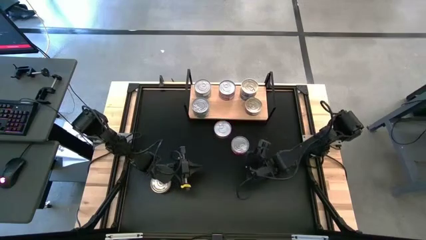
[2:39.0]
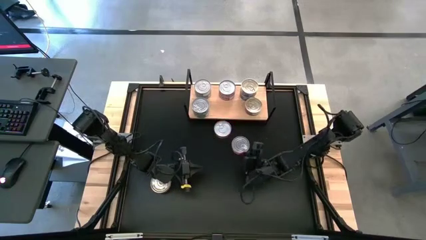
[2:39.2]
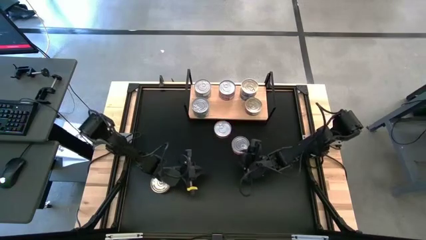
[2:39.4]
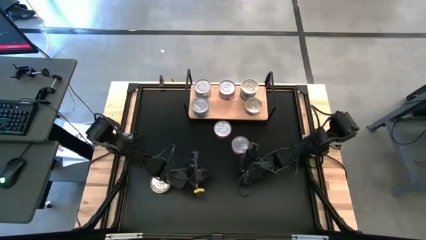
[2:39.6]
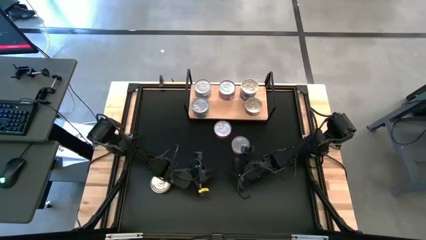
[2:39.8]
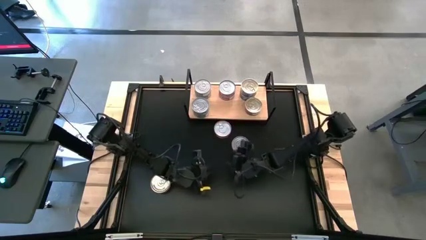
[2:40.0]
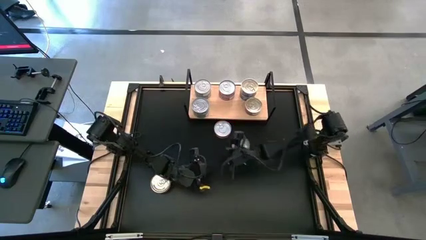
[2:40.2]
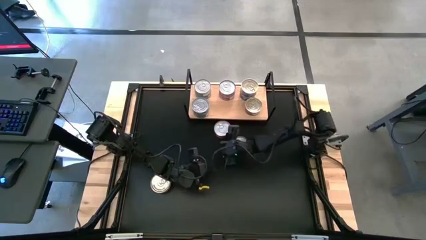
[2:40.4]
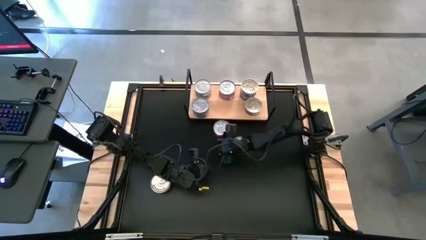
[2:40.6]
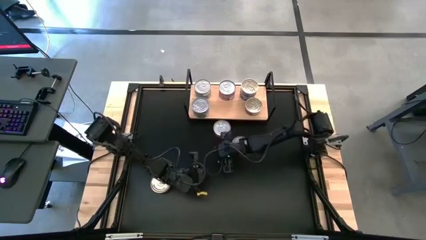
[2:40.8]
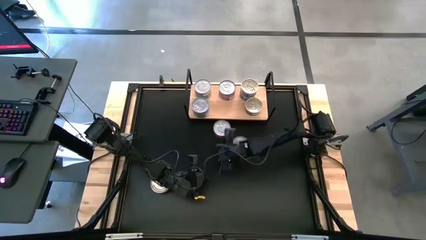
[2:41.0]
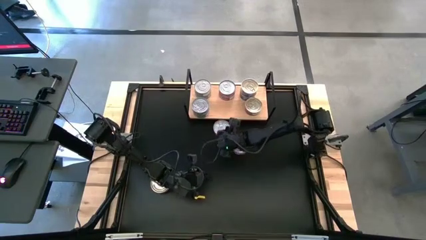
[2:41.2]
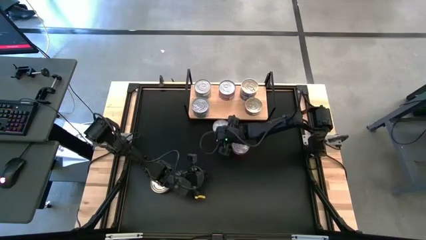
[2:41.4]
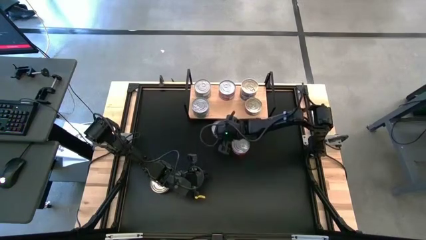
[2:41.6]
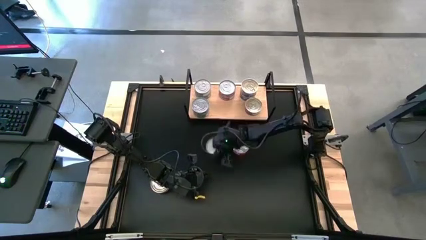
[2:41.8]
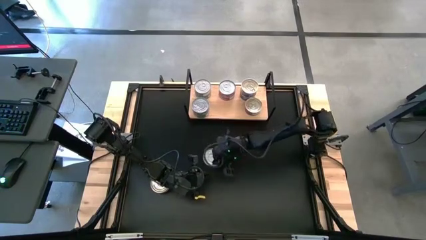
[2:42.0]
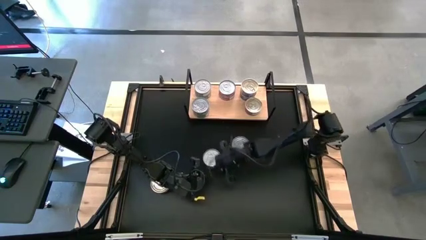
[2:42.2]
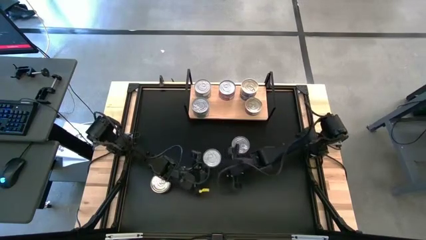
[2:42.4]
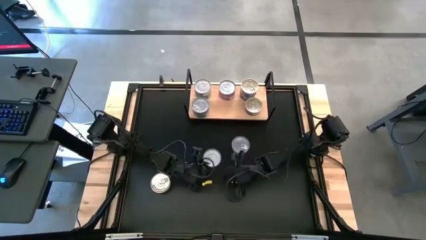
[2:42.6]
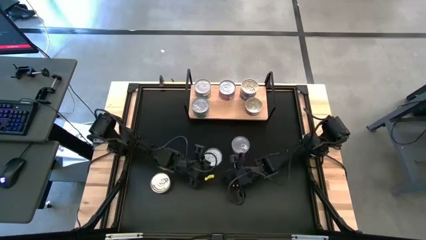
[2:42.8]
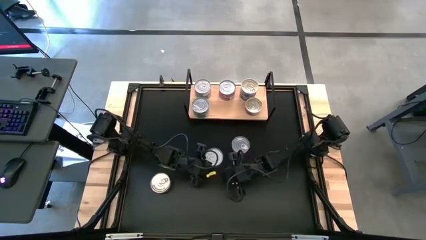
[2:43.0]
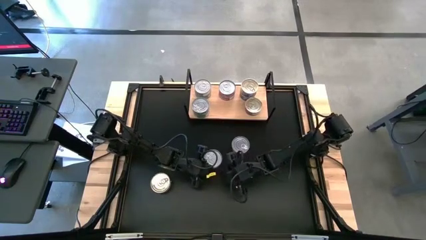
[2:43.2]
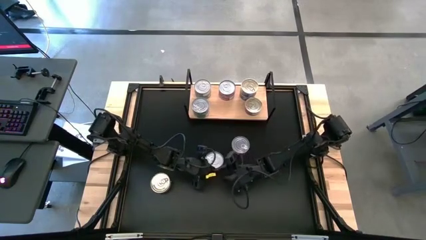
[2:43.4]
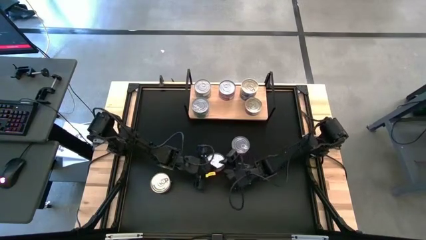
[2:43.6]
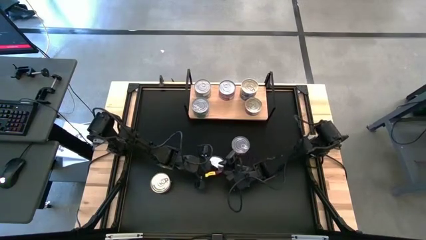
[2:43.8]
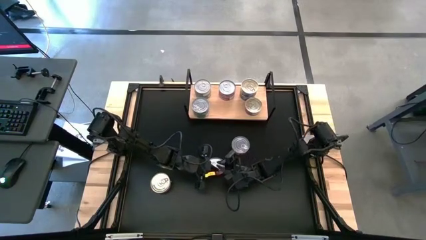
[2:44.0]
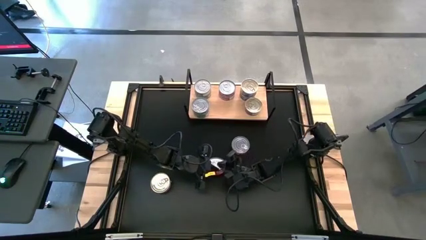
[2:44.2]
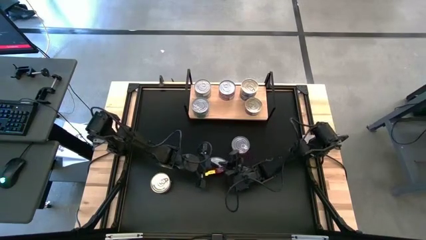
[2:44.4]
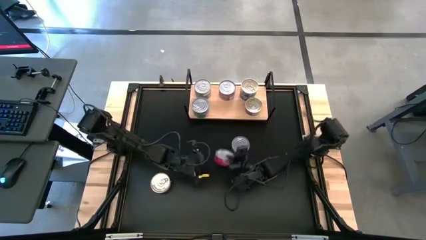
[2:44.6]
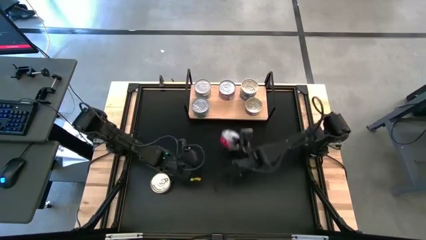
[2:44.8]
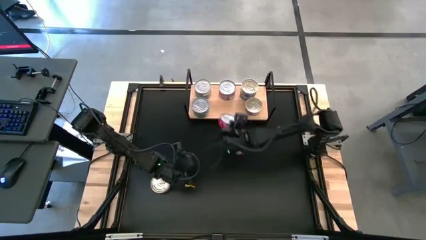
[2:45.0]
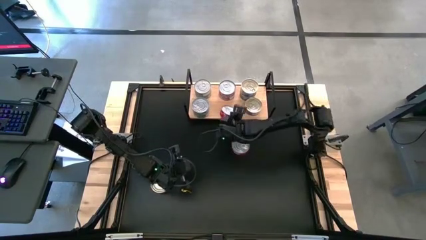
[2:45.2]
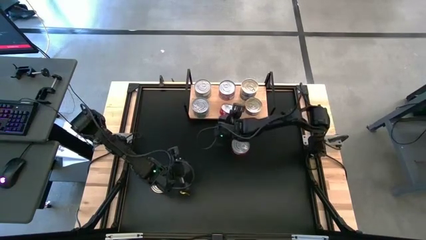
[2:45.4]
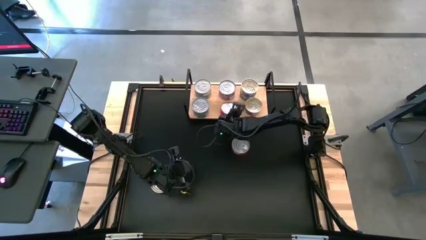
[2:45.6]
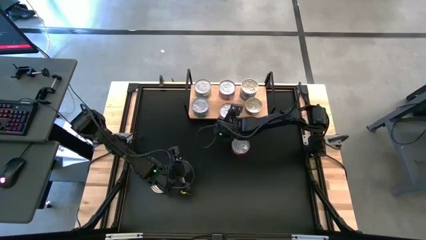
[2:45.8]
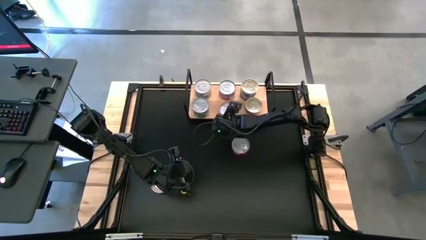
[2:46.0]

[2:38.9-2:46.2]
Task: Stack canned seafood by type on shelf
Put the red tuna can on the shelf

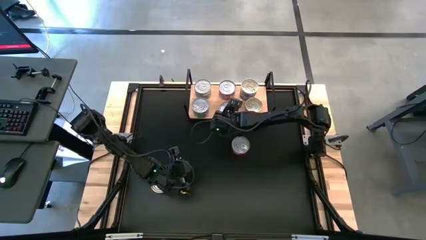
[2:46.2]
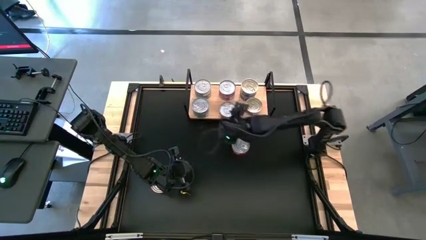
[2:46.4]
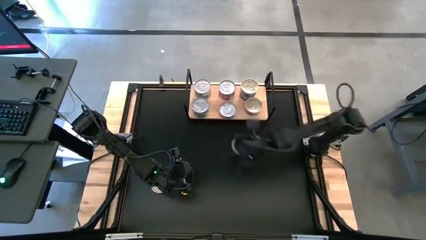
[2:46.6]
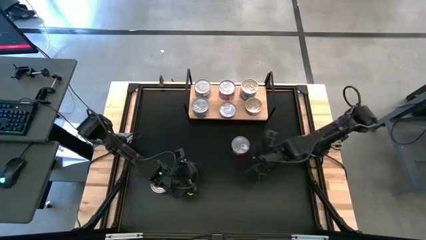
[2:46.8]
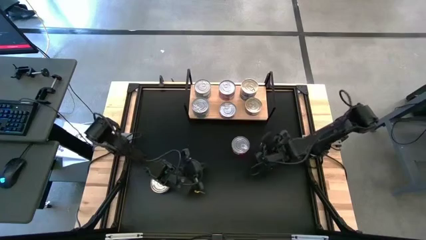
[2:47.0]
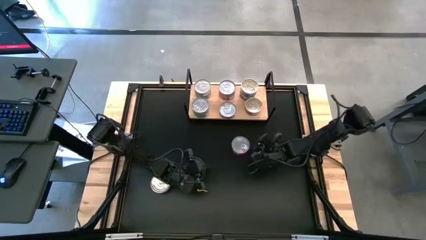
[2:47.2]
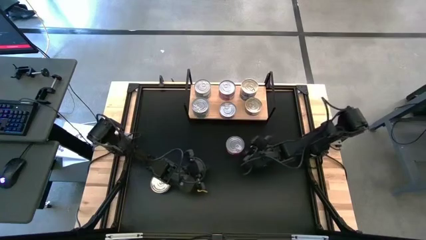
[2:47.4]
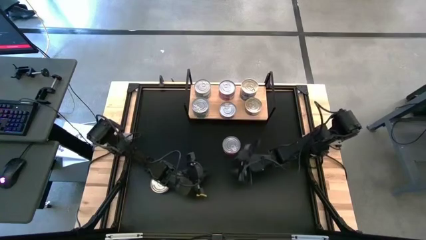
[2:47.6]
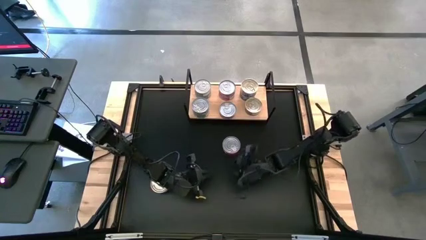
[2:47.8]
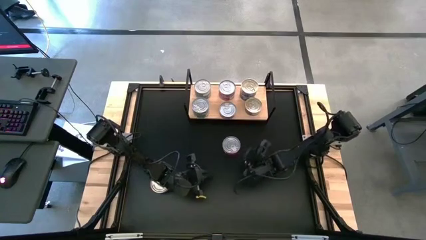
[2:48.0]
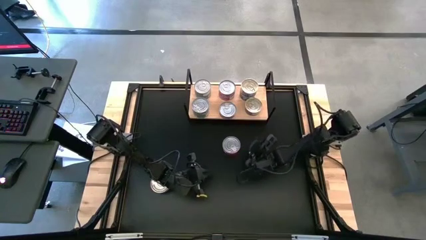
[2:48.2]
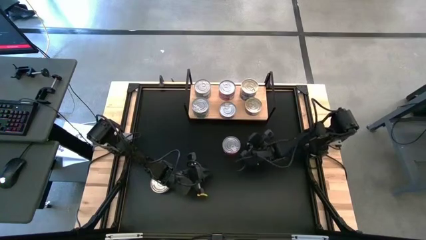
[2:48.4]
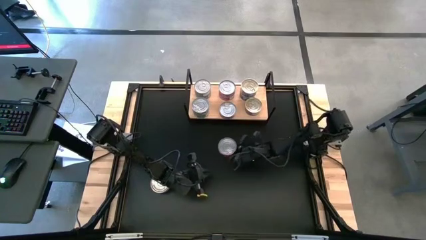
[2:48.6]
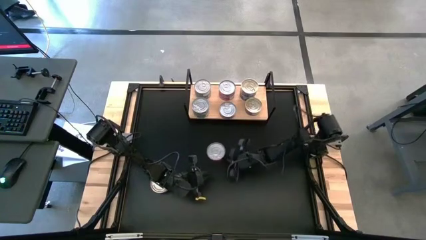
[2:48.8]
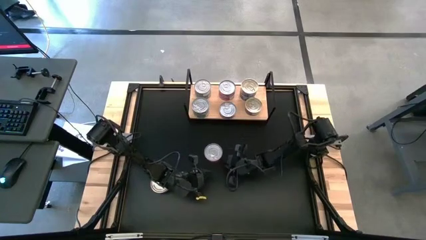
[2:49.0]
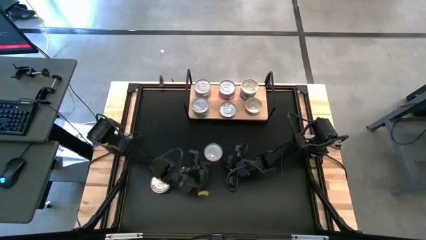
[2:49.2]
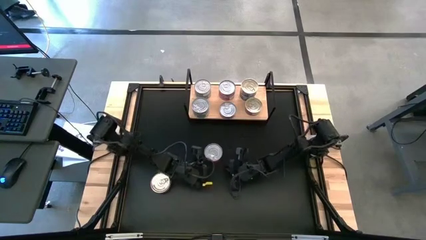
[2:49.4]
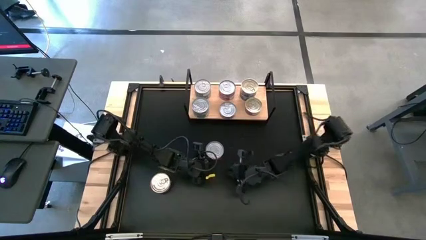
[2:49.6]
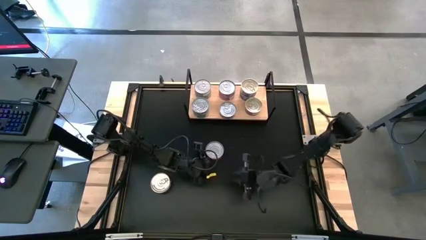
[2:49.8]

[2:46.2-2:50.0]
Stack the red tuna can on top of the red tuna can on the shelf

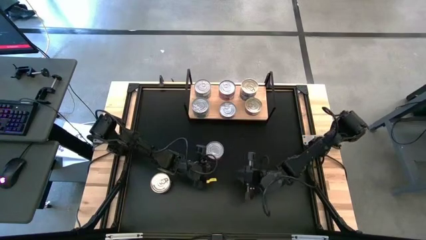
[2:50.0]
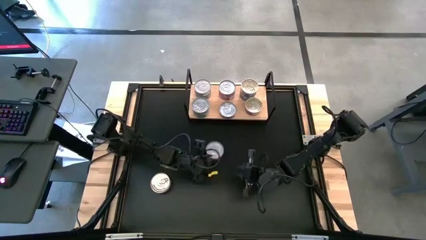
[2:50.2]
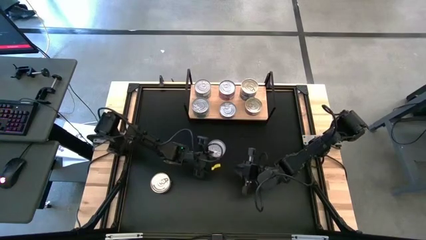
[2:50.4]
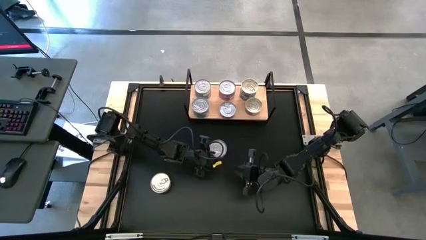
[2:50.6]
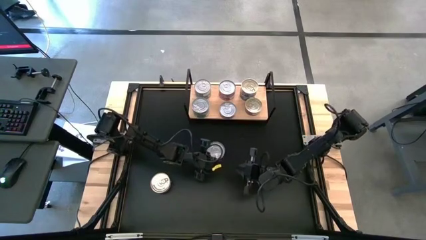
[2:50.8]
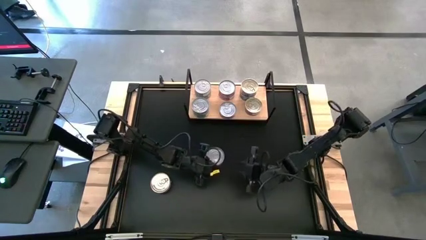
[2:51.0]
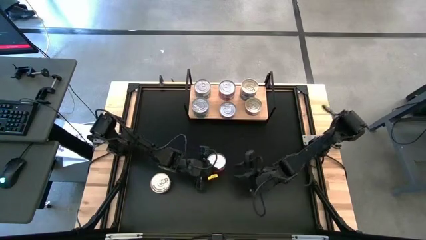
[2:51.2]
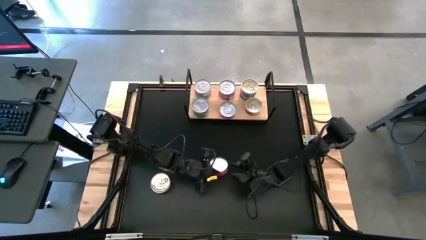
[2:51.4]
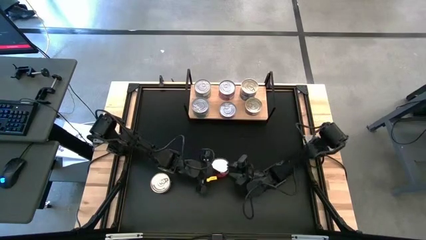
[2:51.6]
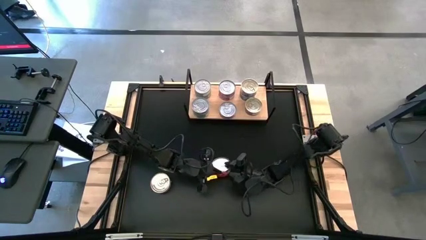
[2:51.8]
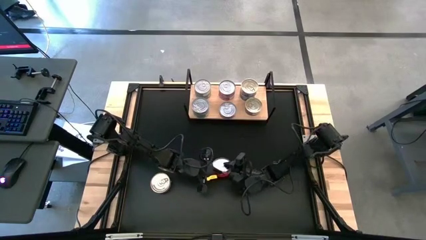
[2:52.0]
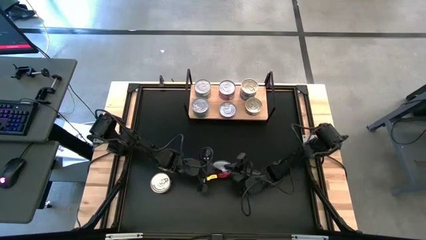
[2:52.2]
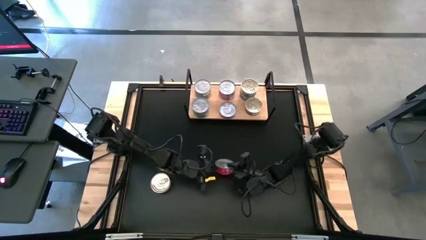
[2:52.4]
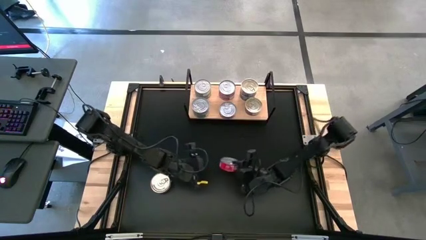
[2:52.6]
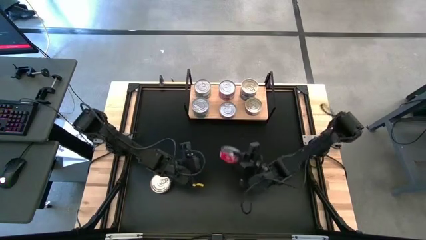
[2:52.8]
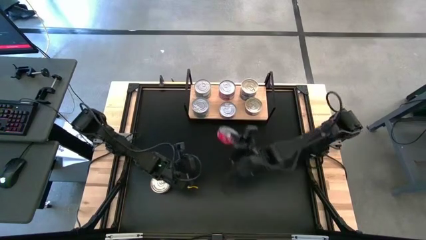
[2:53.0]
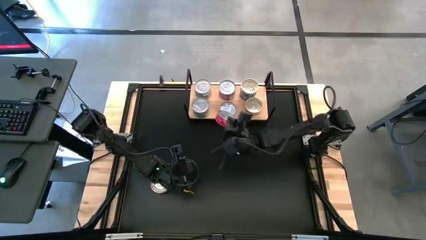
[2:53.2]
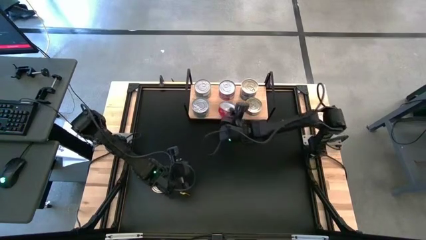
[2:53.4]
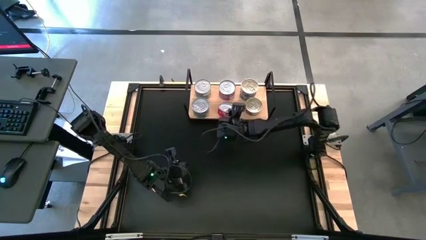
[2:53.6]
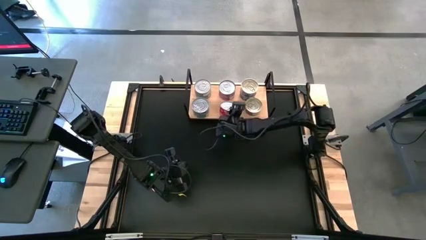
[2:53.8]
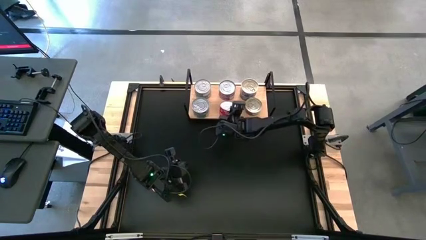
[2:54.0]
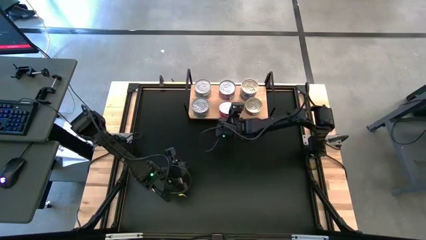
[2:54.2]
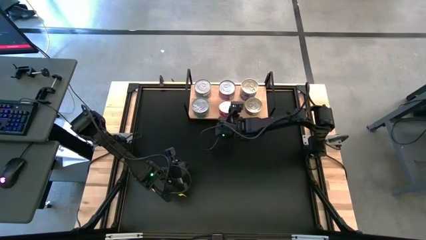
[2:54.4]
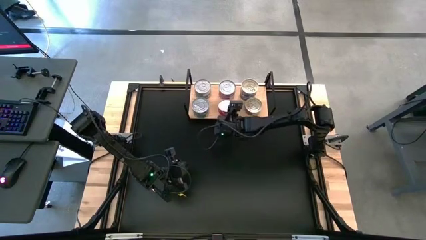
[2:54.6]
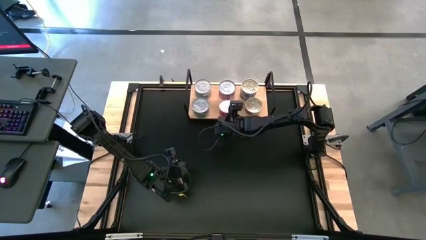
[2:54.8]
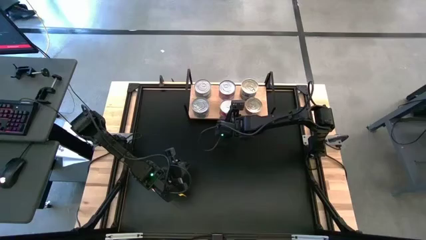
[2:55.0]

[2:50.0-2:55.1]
Stack the red tuna can on top of the red tuna can on the shelf
